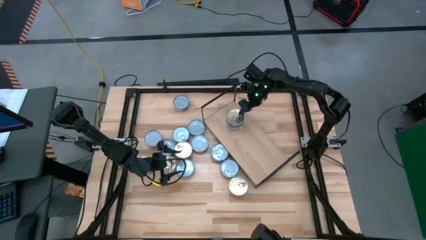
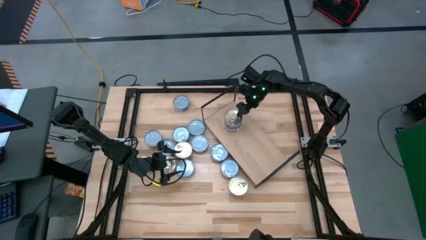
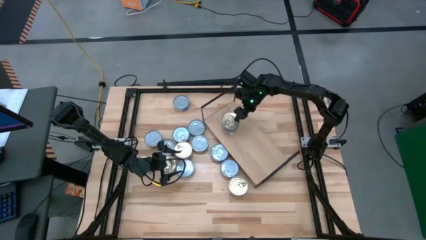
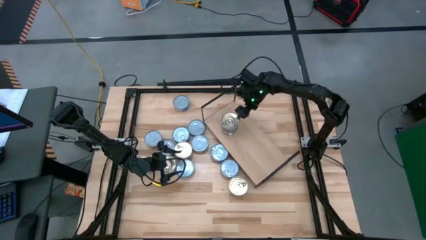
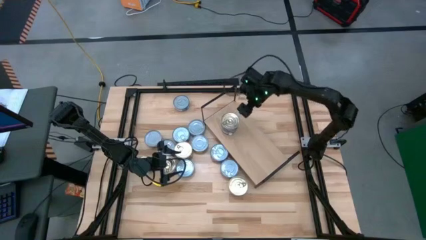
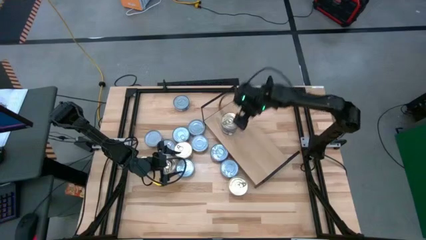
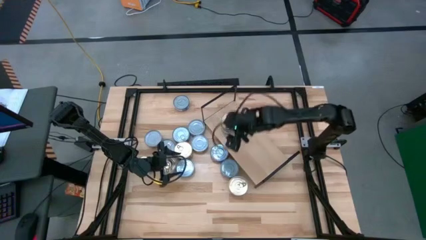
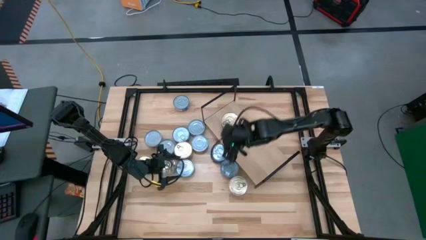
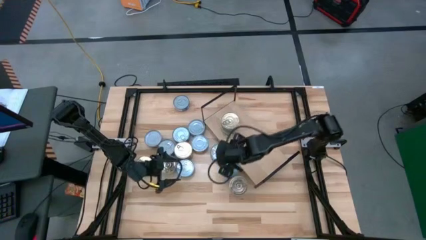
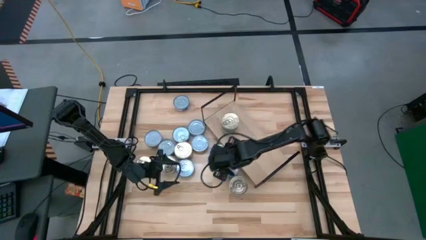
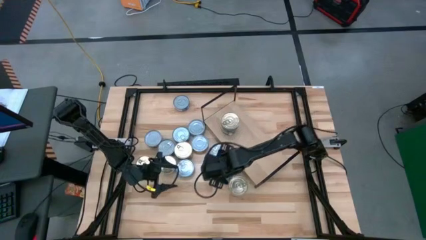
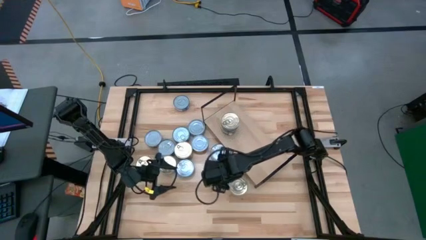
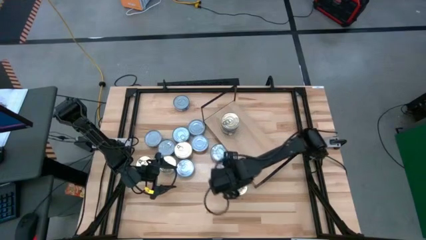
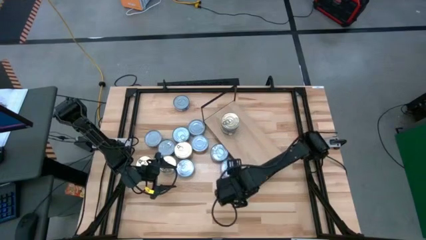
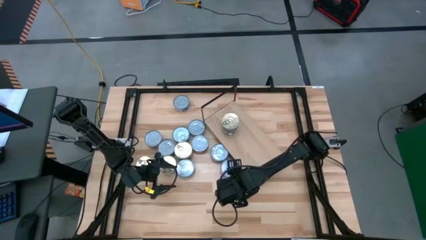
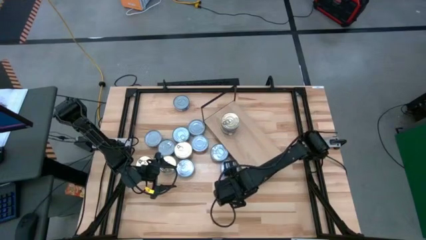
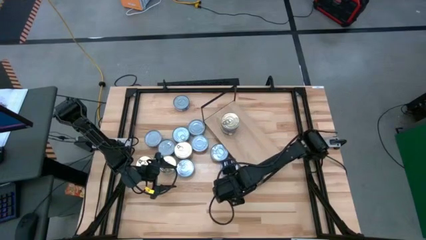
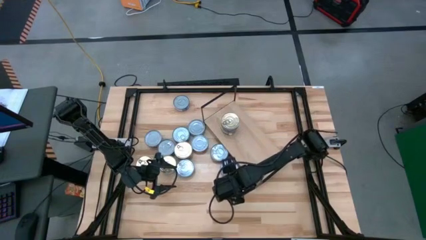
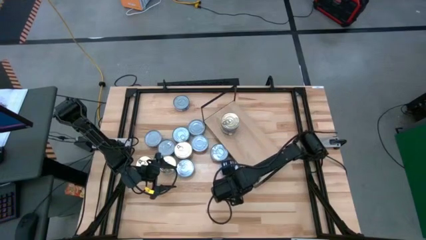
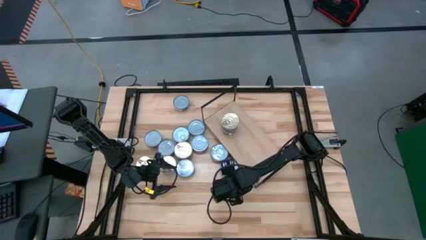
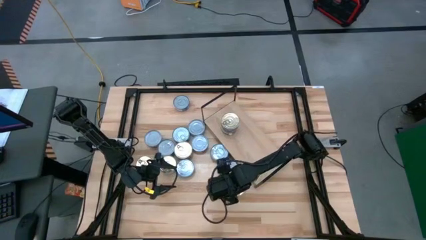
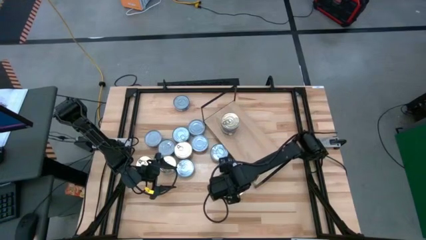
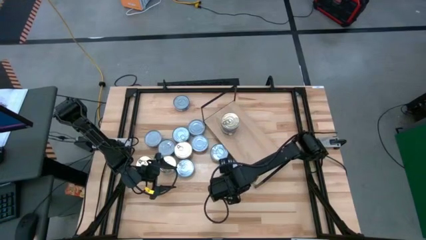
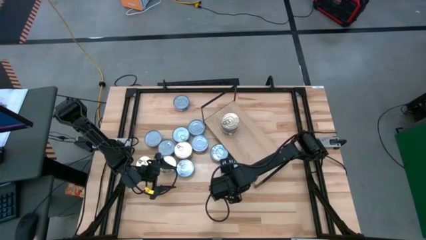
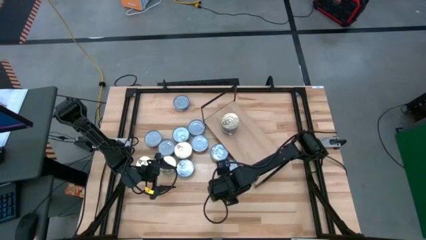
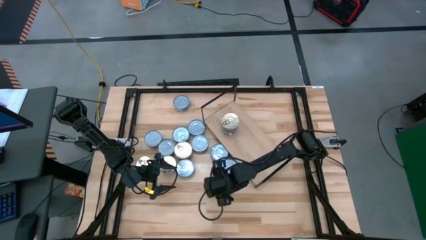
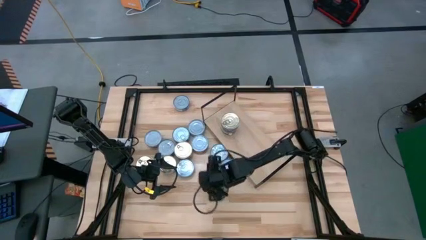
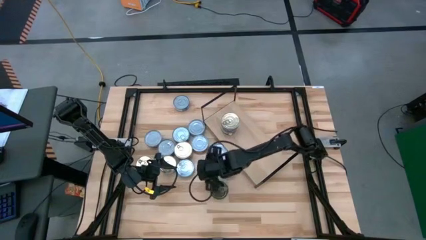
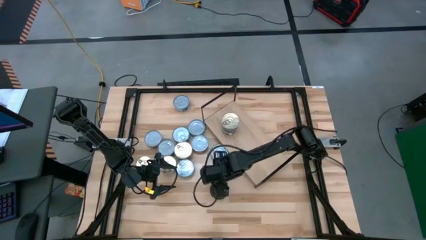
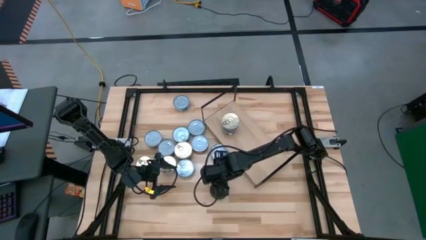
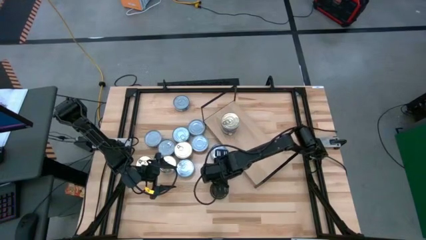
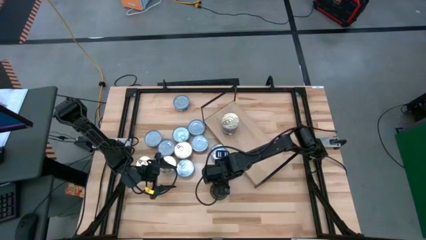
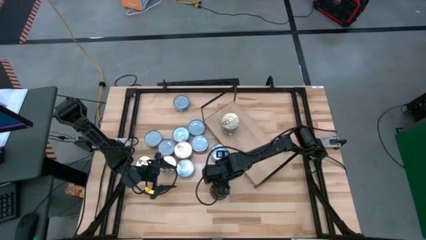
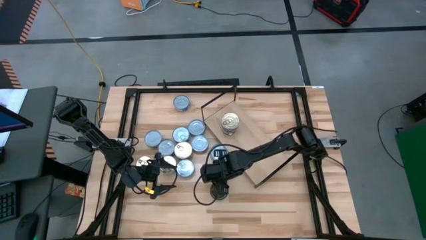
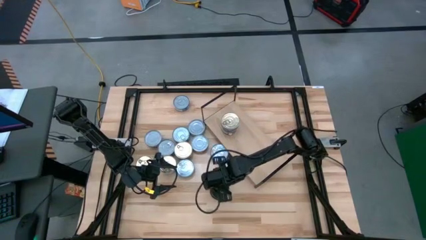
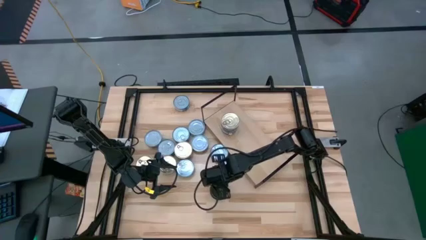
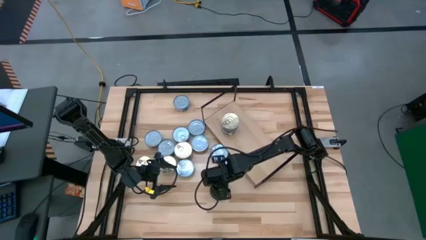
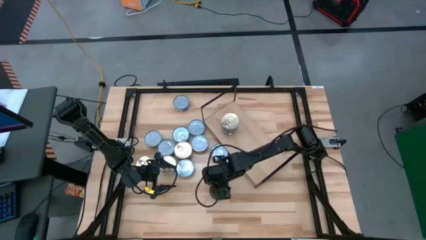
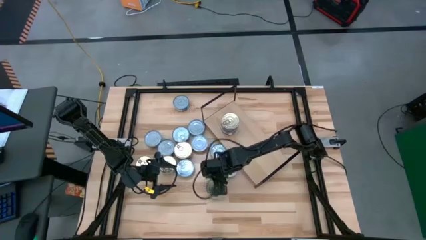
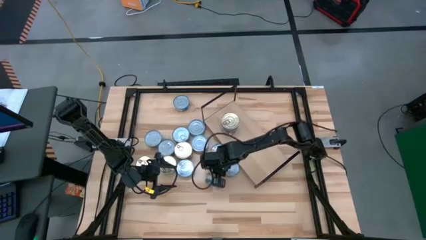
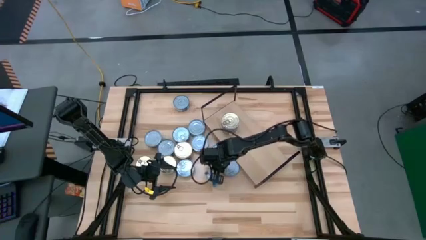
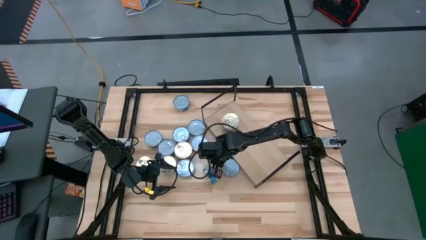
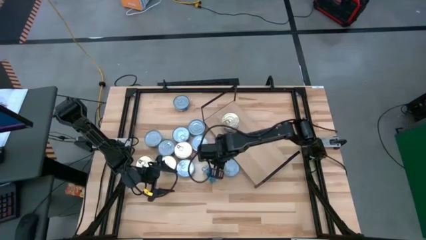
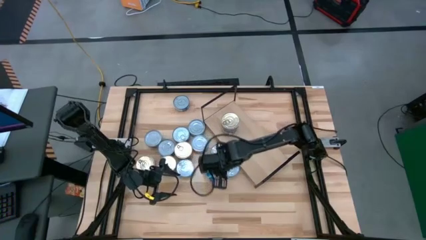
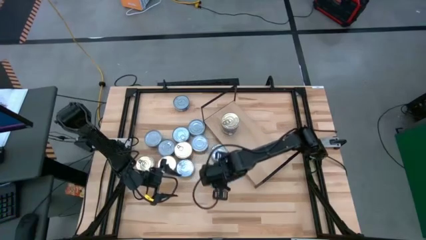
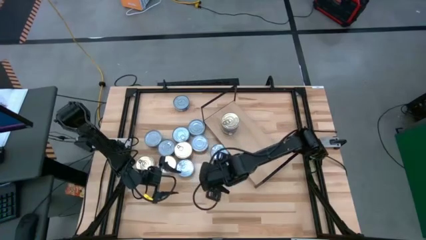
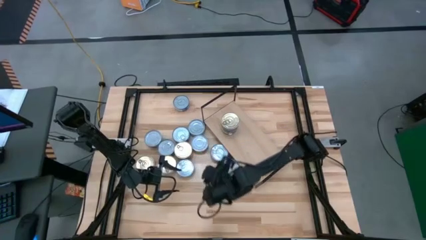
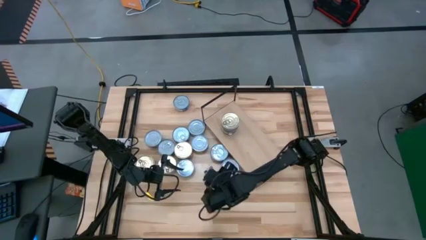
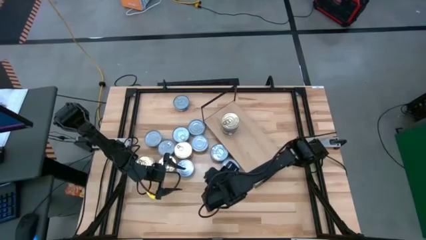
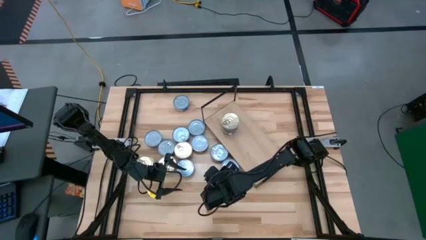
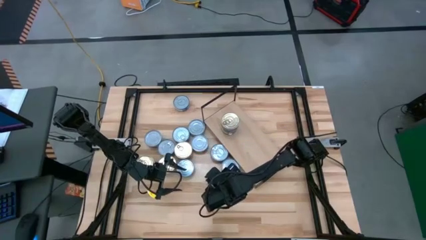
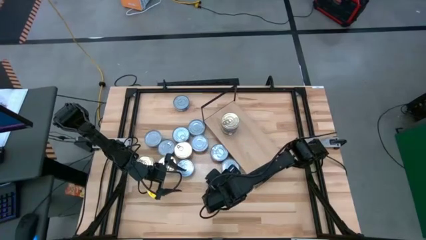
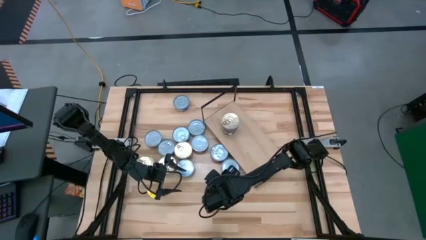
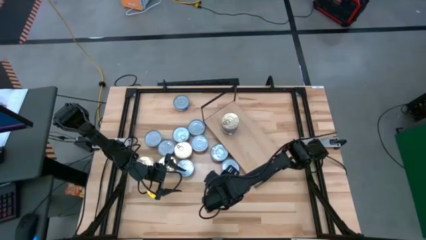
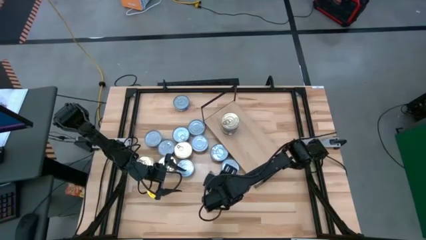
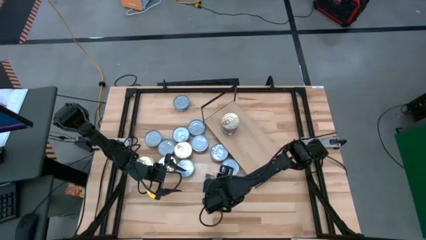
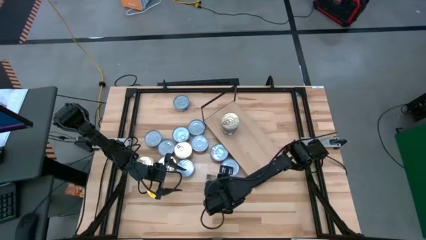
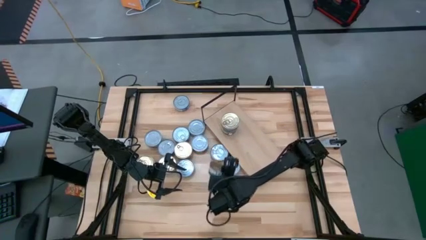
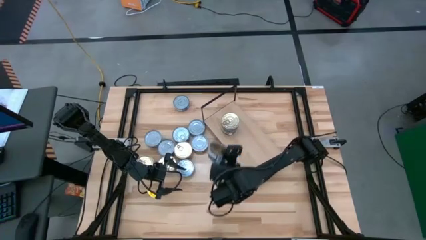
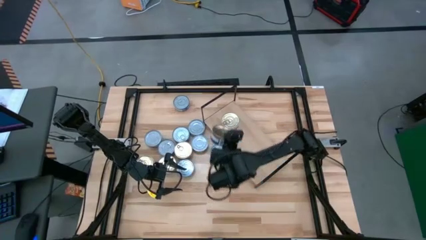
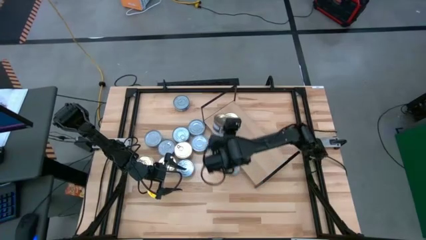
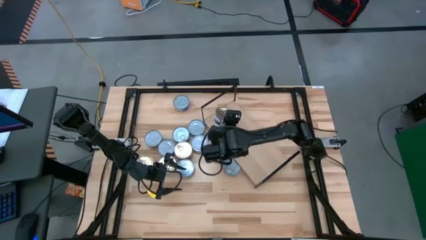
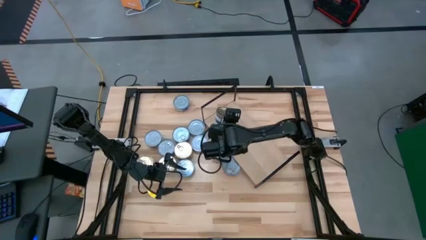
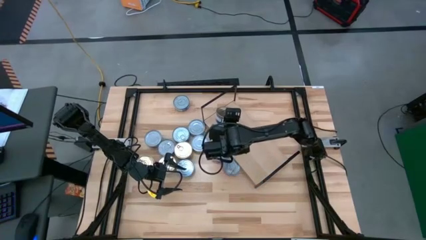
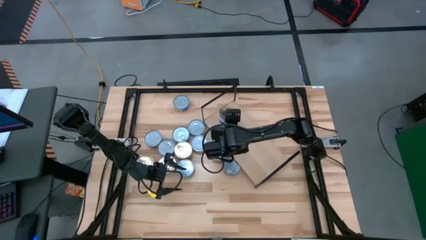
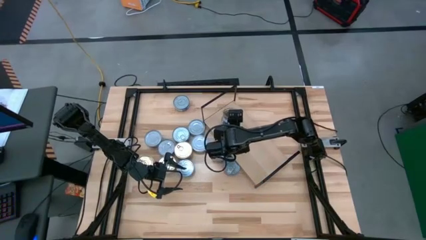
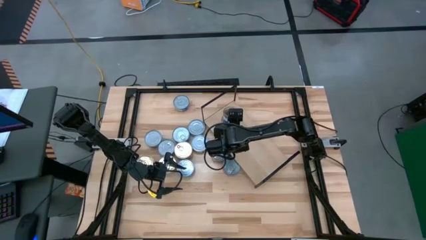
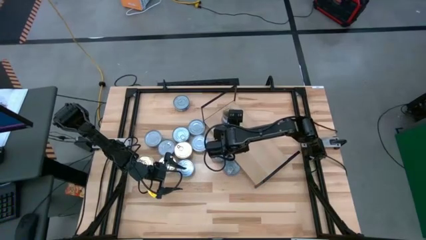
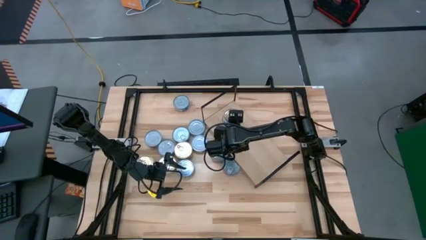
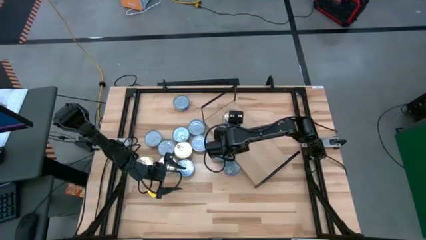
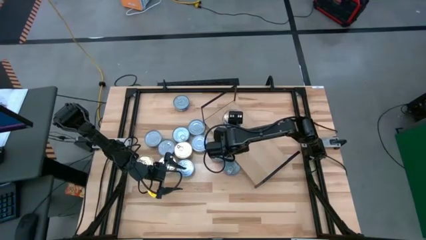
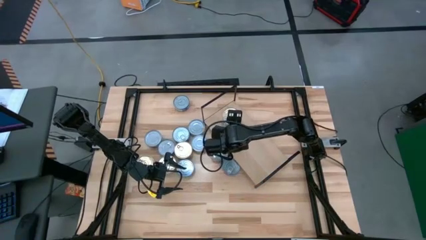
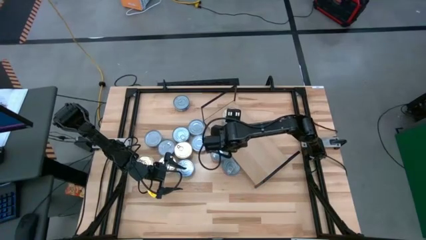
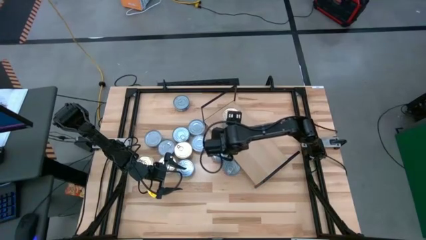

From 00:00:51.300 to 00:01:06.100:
Task: Stack canned seafood by type on shelf
Stack the blue tuna can on top of the blue tuna can on the shelf
